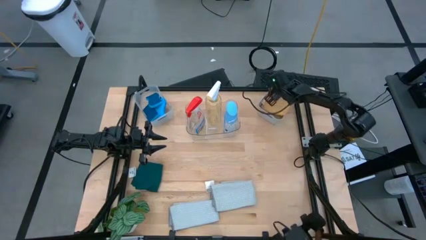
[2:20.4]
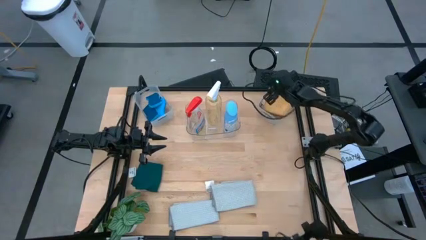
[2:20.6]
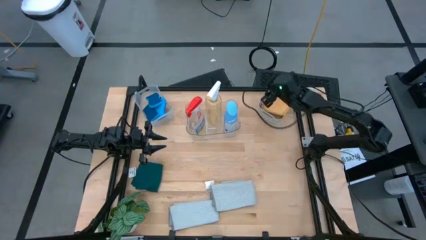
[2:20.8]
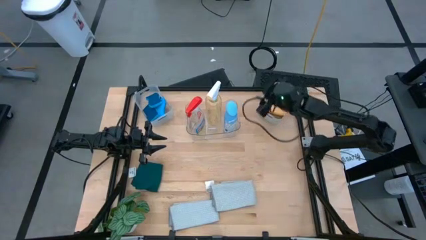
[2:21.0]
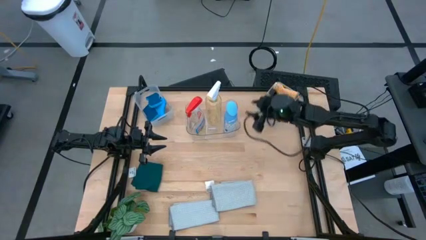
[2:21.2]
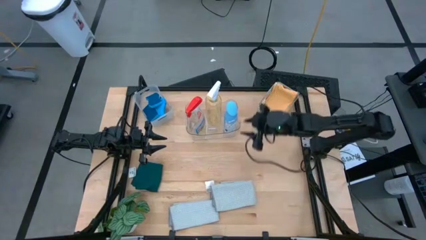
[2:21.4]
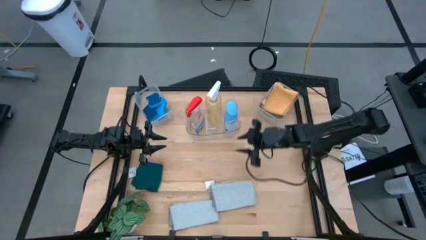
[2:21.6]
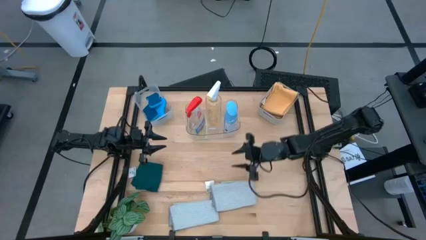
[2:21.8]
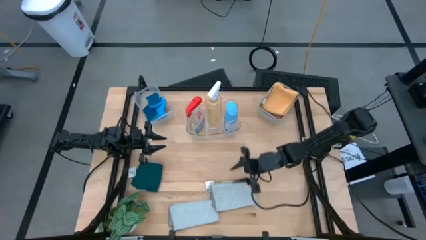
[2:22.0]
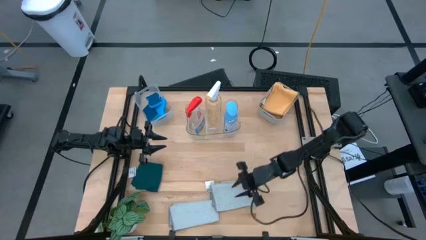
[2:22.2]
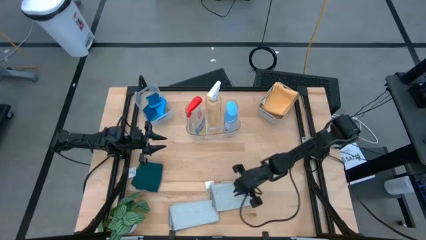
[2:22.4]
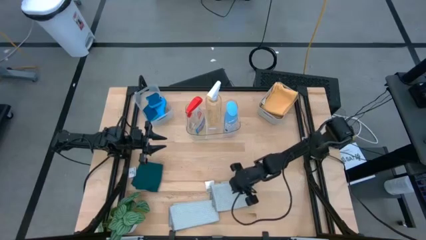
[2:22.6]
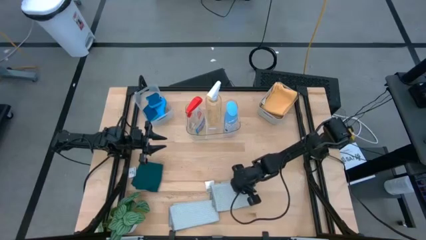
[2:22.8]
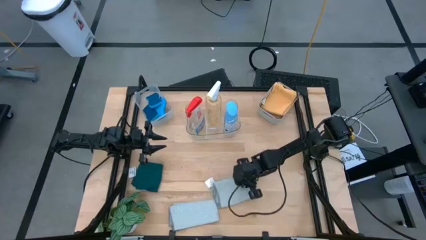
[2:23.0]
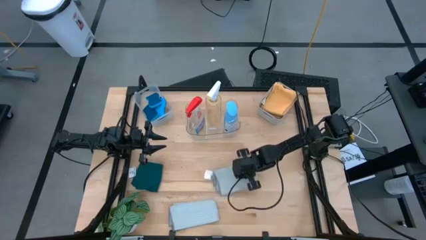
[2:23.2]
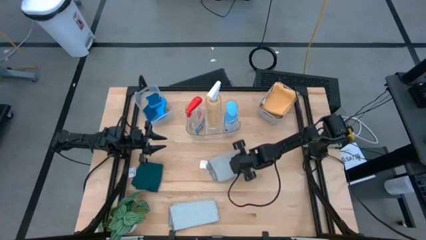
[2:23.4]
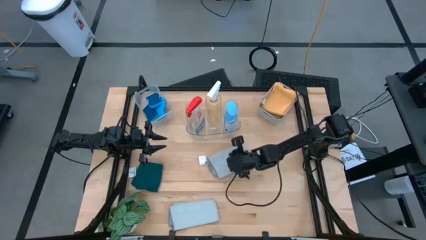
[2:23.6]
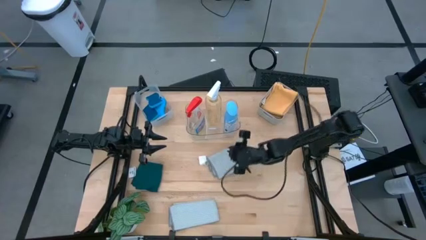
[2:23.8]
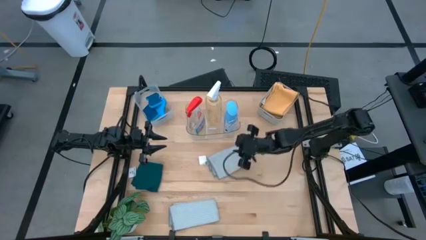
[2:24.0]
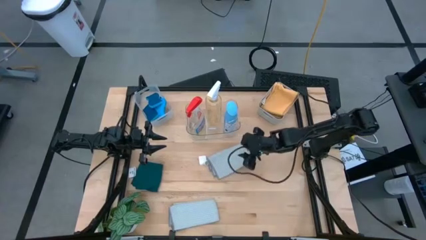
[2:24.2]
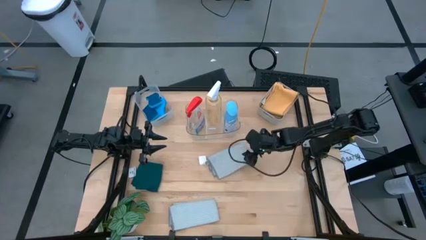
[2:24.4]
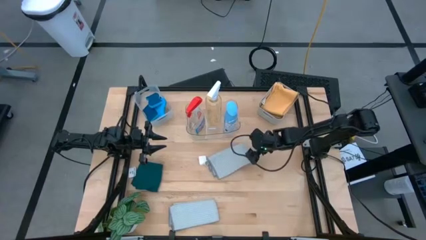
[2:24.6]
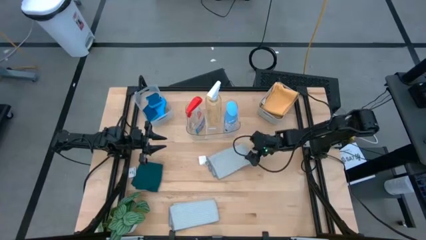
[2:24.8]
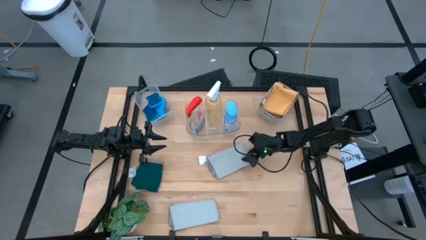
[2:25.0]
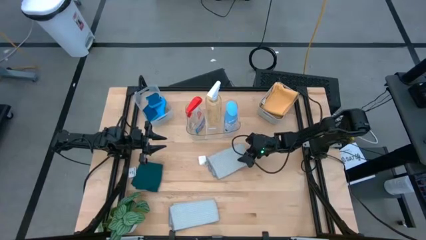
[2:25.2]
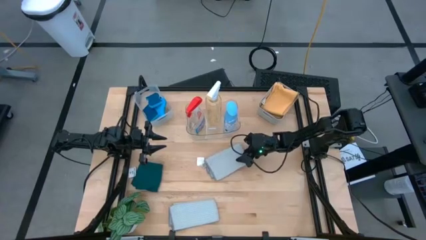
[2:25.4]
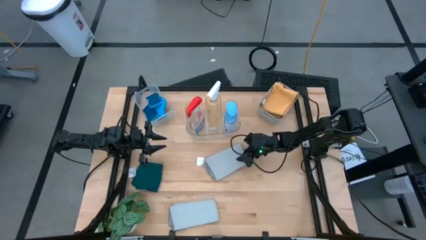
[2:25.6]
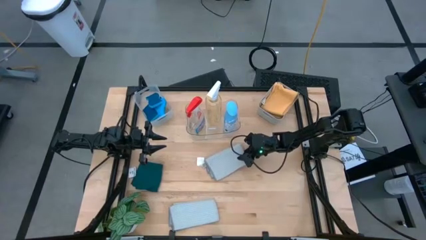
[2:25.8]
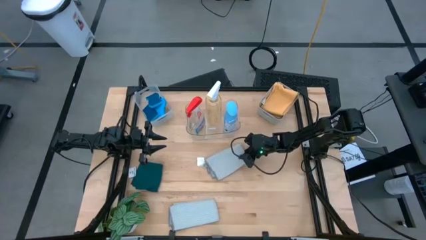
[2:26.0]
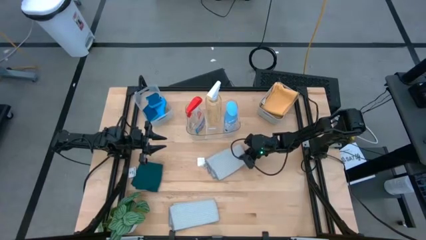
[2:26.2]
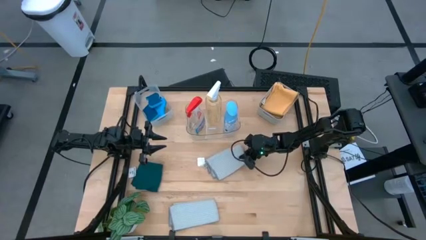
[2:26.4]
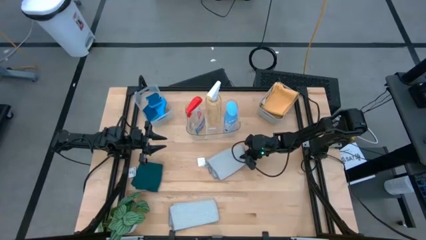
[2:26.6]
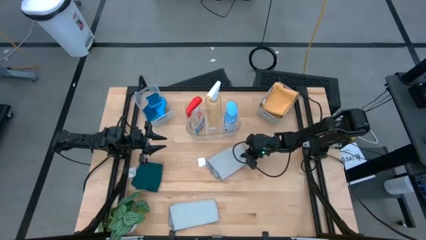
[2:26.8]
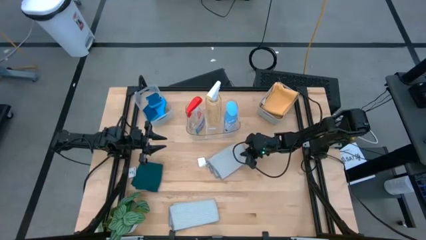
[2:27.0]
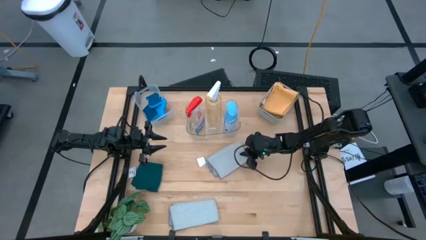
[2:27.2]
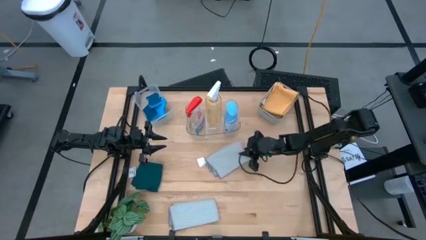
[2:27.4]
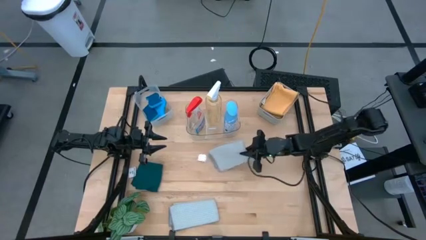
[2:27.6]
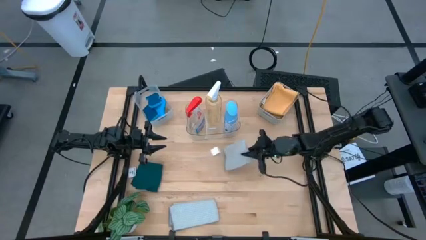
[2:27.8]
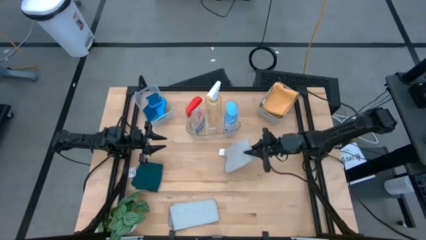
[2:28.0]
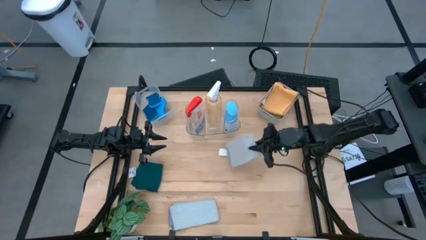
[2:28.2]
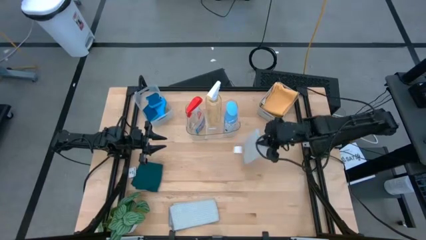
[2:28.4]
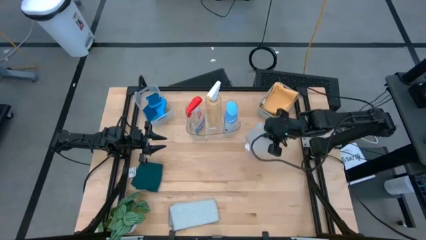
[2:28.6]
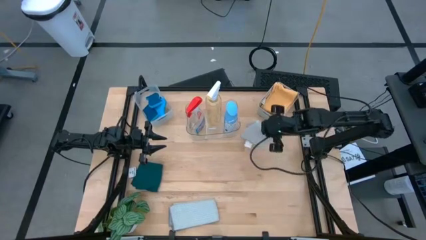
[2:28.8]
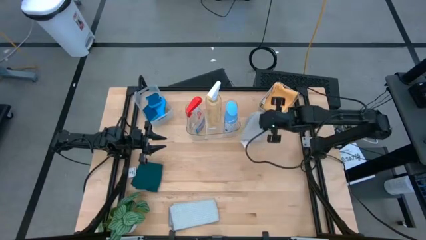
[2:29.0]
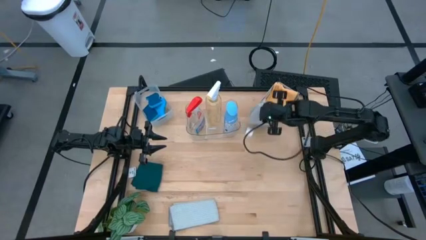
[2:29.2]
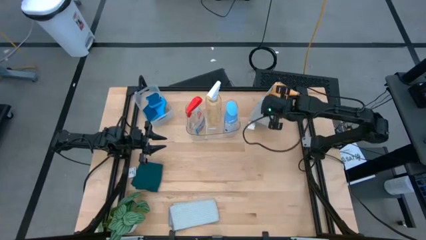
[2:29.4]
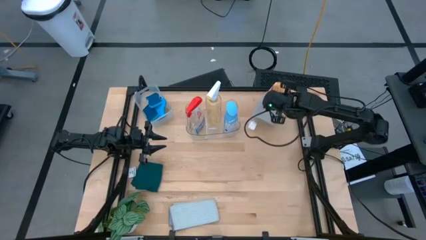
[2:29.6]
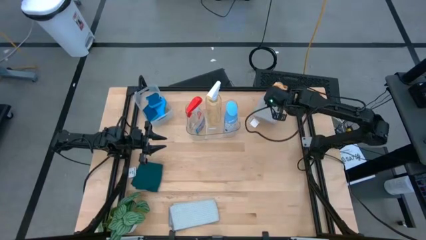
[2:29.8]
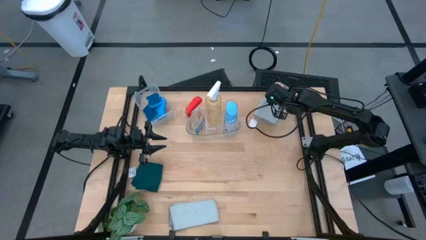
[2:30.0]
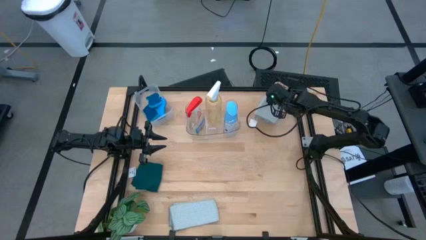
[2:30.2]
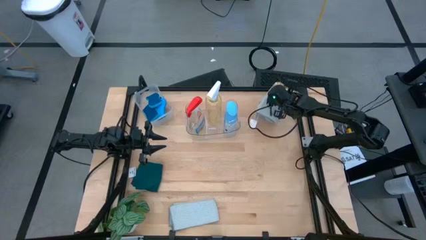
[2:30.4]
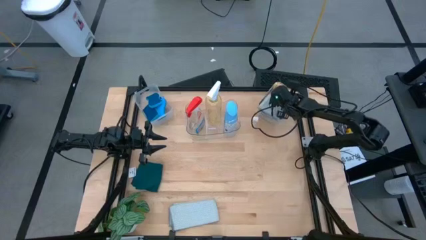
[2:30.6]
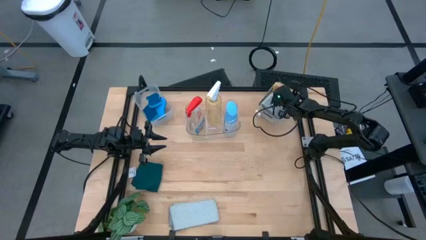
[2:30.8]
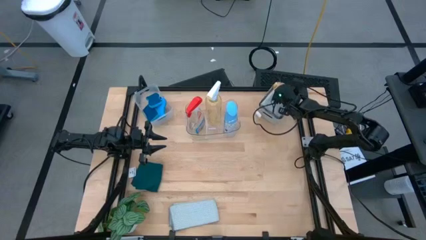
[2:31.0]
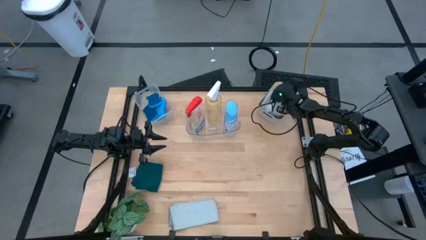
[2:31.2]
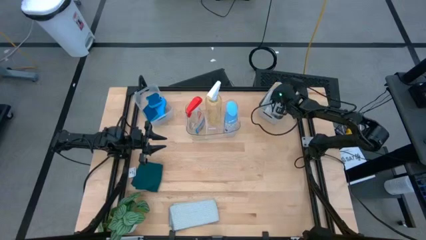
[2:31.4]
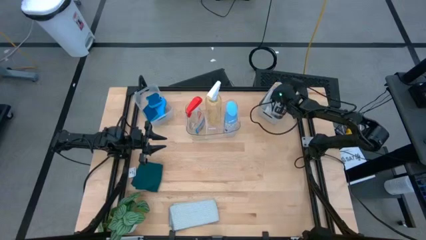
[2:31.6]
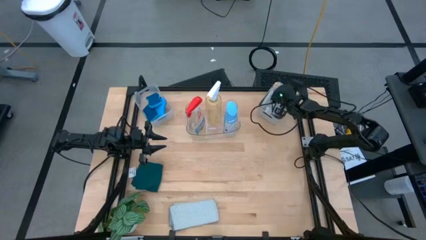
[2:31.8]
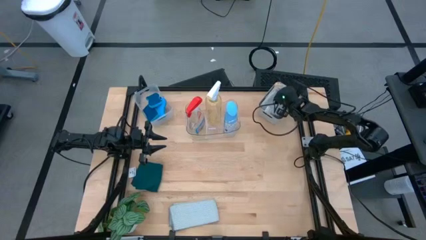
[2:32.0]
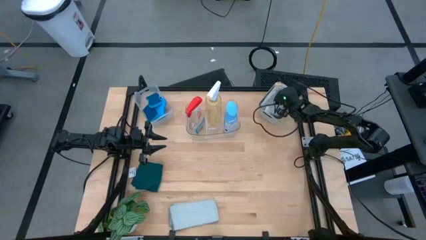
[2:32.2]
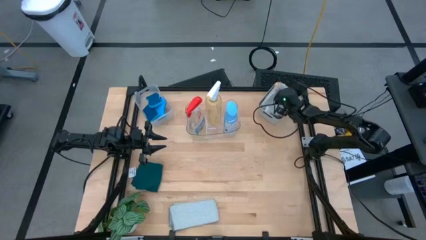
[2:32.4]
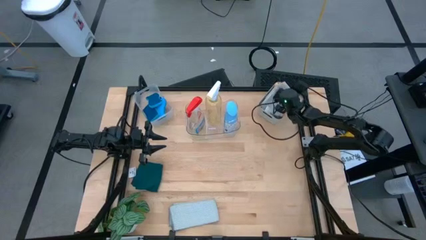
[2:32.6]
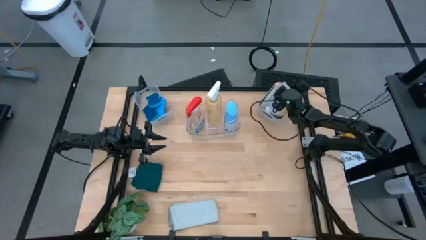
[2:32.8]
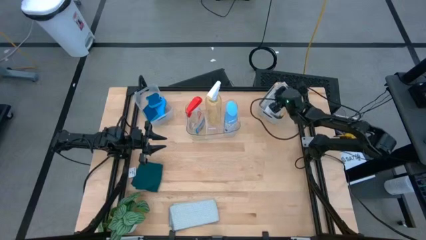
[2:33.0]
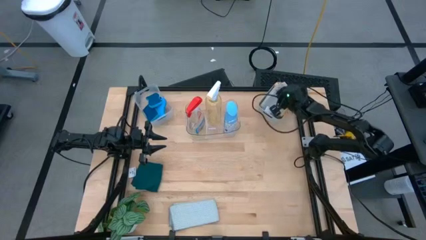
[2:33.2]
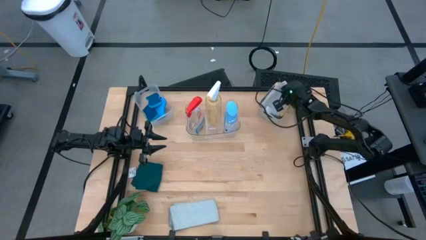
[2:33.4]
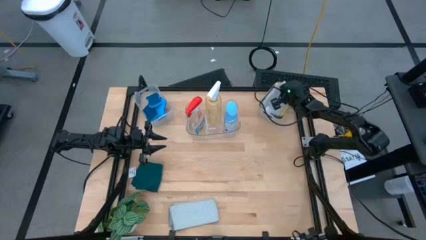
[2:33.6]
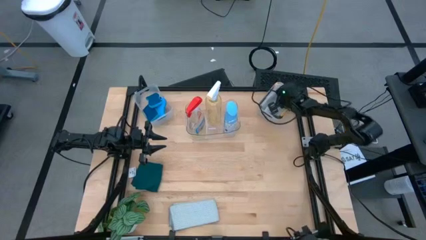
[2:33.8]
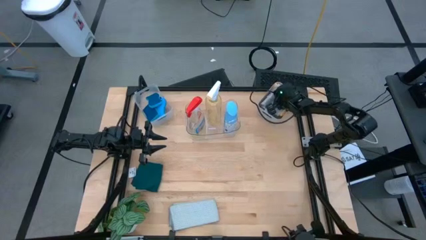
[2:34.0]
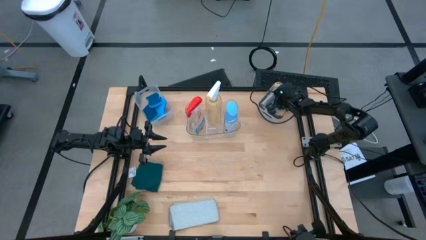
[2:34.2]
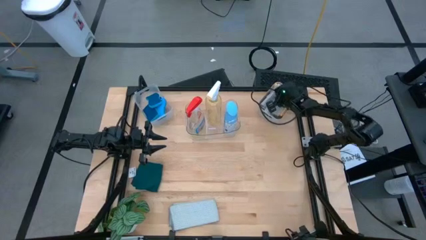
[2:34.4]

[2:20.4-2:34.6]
Task: Pick & Place Kitchen Items
Put the right gray microfiber towel into the gray bin
